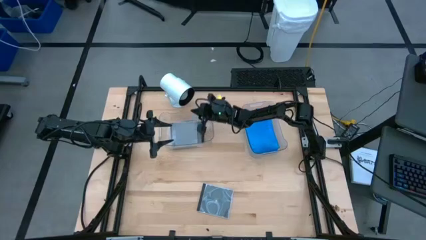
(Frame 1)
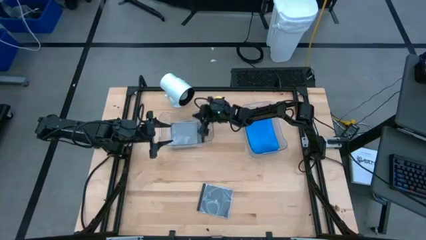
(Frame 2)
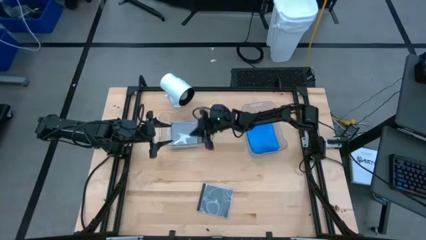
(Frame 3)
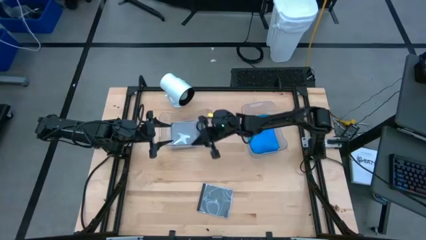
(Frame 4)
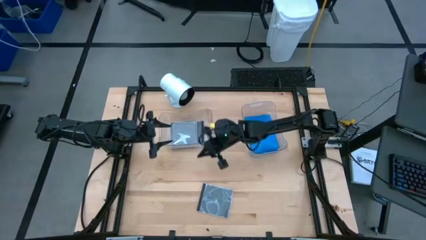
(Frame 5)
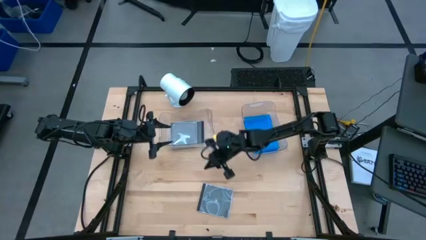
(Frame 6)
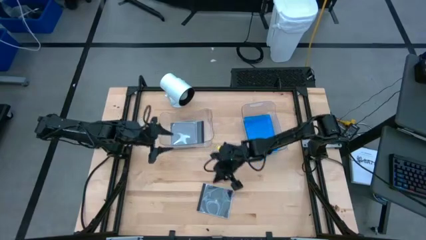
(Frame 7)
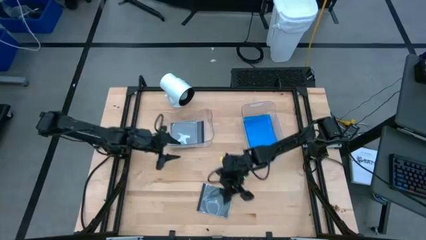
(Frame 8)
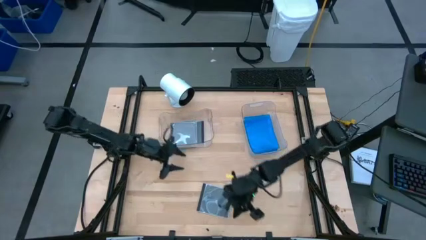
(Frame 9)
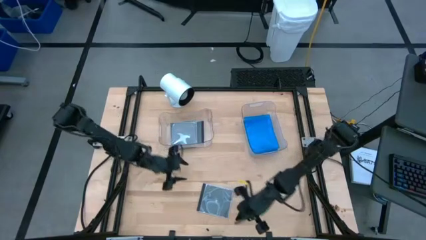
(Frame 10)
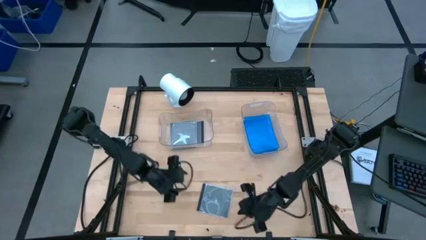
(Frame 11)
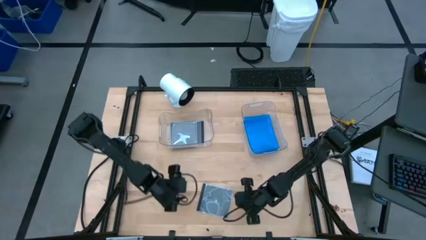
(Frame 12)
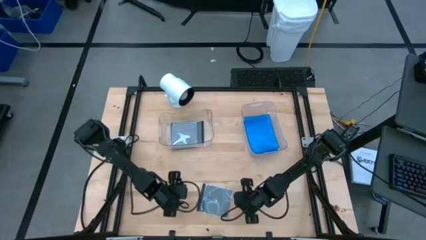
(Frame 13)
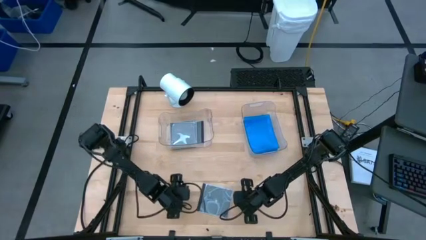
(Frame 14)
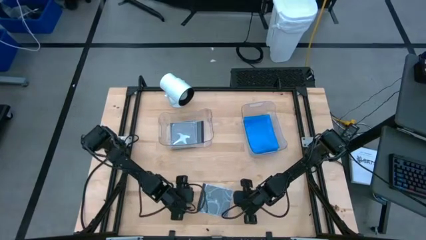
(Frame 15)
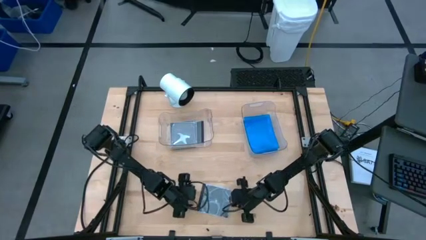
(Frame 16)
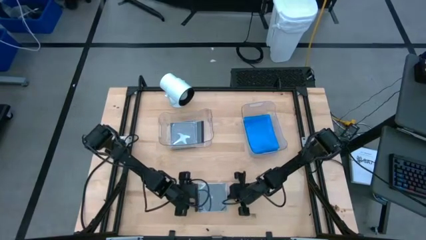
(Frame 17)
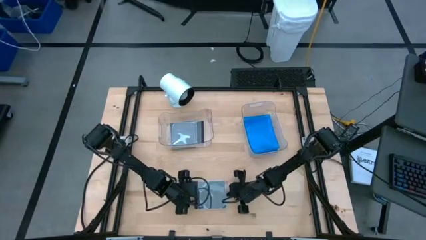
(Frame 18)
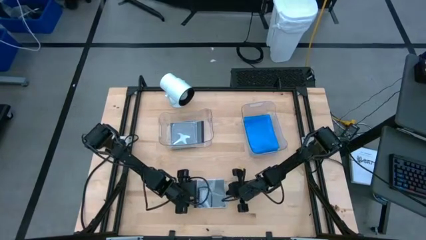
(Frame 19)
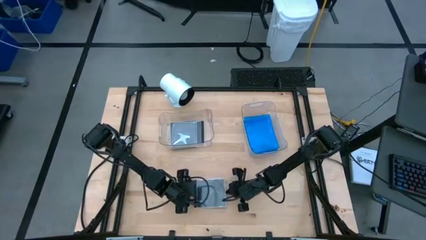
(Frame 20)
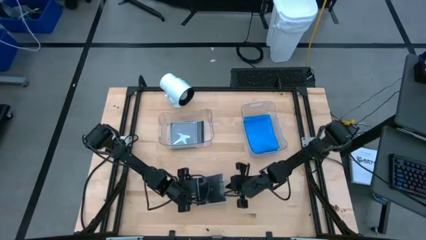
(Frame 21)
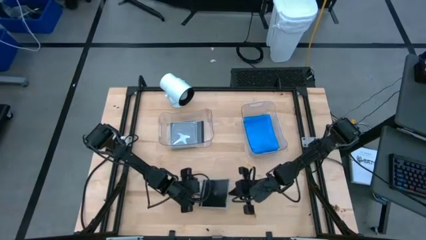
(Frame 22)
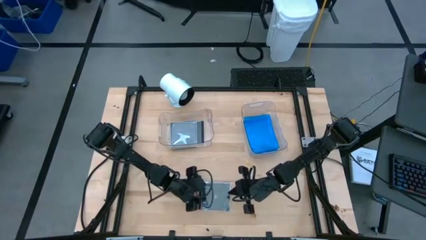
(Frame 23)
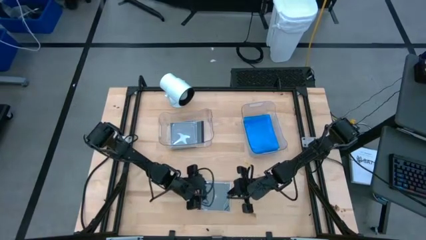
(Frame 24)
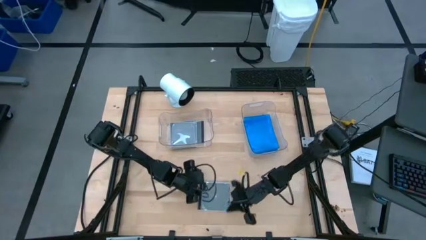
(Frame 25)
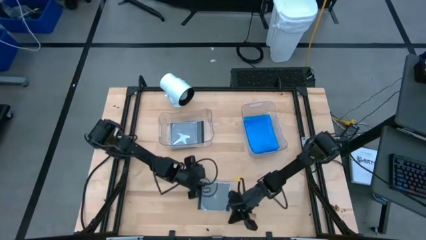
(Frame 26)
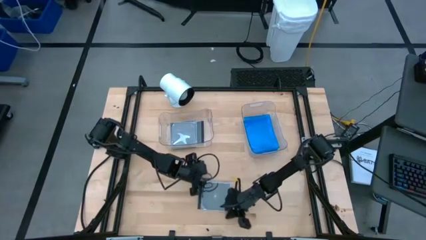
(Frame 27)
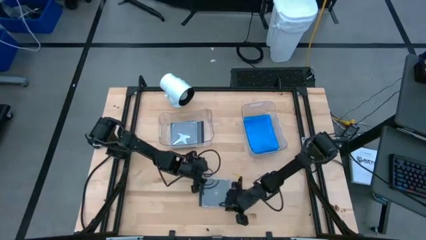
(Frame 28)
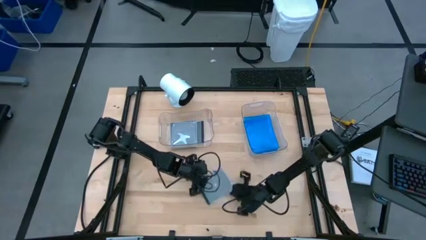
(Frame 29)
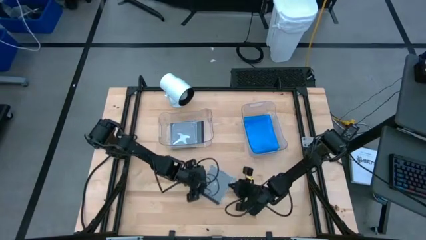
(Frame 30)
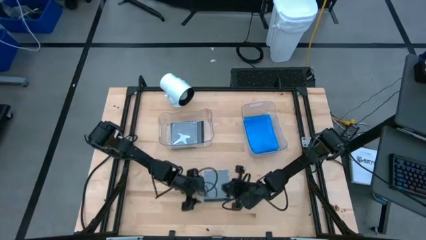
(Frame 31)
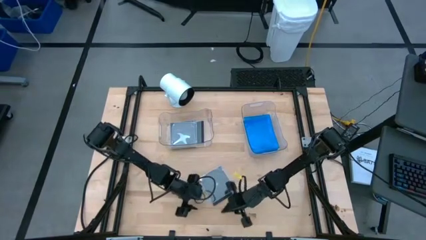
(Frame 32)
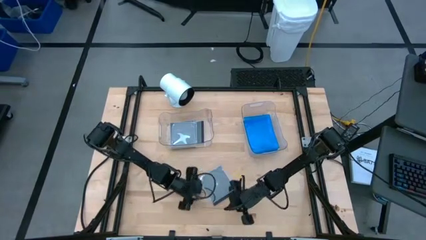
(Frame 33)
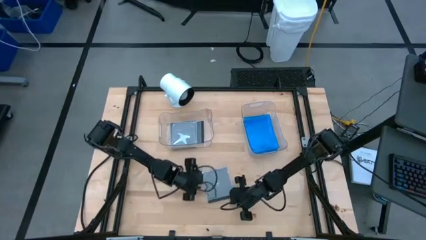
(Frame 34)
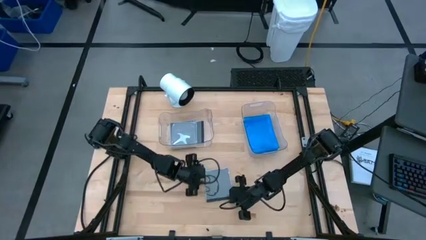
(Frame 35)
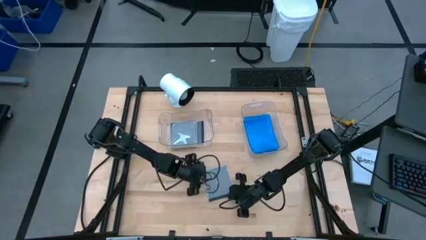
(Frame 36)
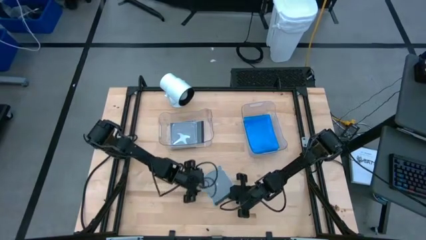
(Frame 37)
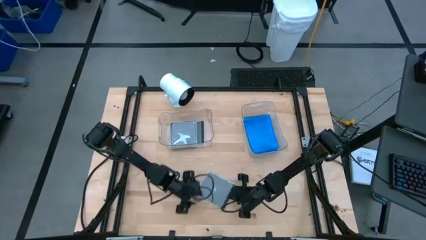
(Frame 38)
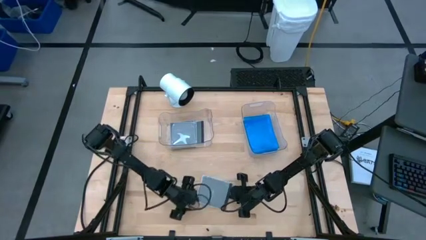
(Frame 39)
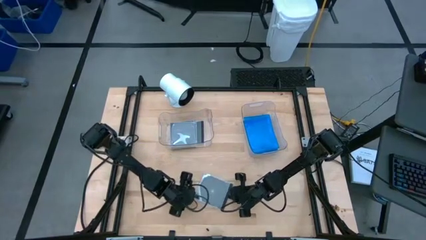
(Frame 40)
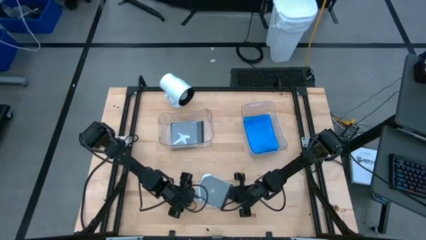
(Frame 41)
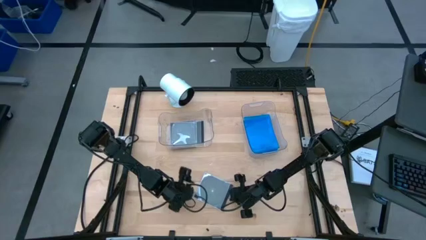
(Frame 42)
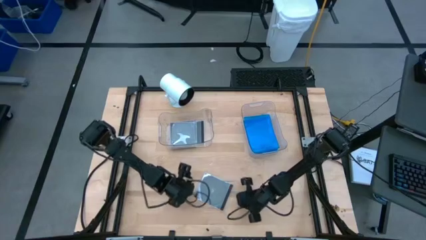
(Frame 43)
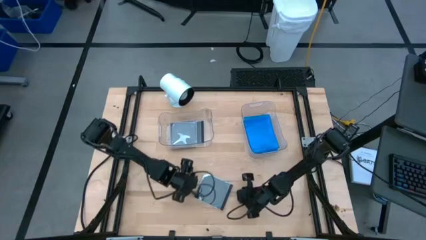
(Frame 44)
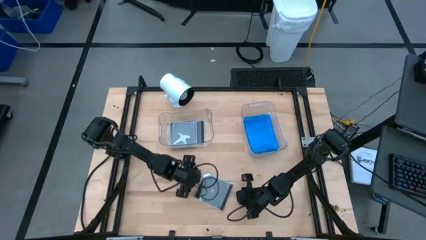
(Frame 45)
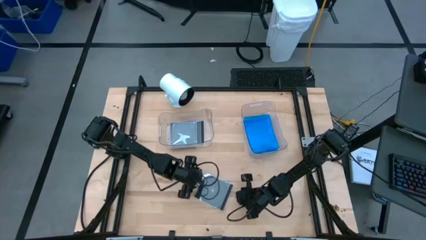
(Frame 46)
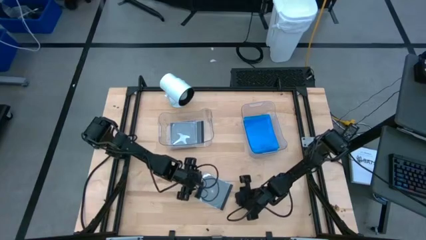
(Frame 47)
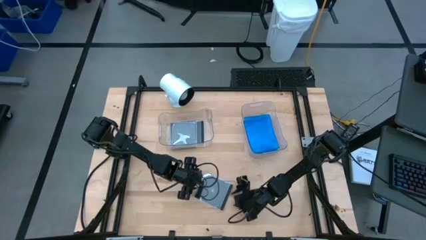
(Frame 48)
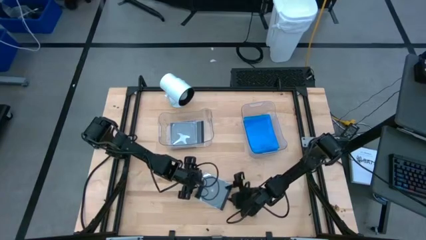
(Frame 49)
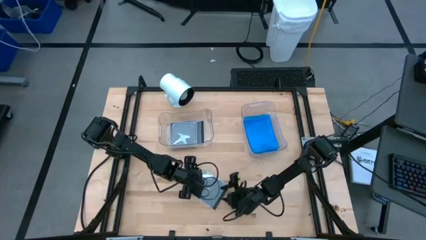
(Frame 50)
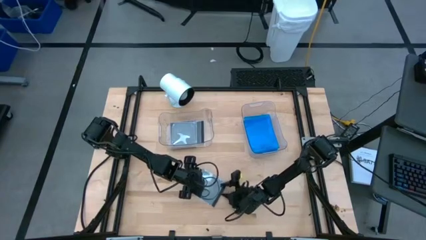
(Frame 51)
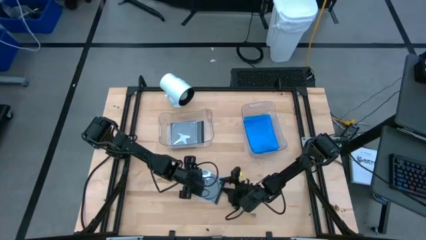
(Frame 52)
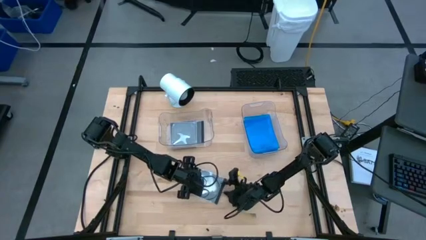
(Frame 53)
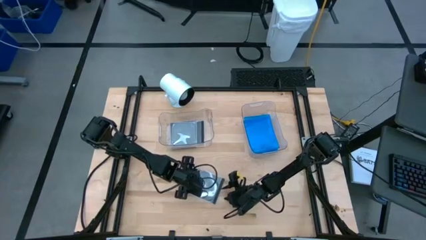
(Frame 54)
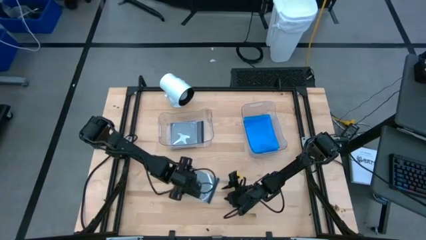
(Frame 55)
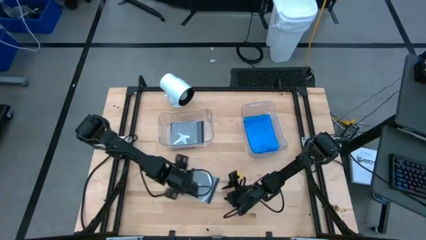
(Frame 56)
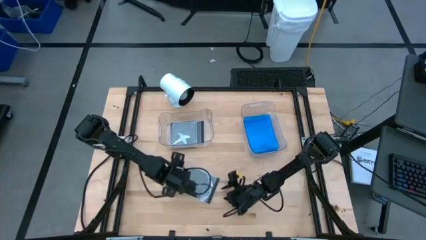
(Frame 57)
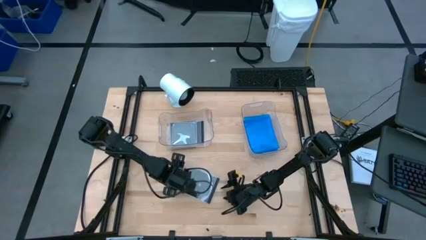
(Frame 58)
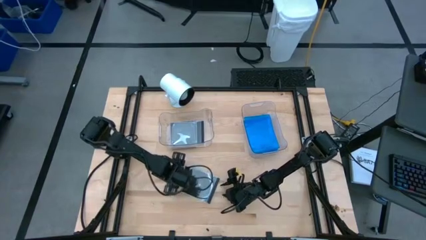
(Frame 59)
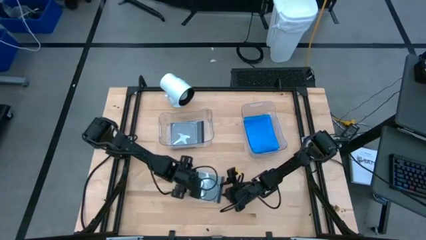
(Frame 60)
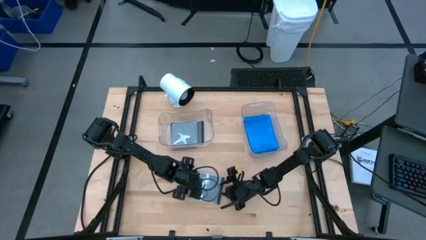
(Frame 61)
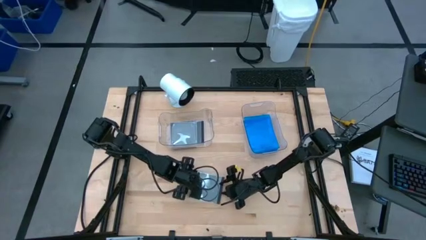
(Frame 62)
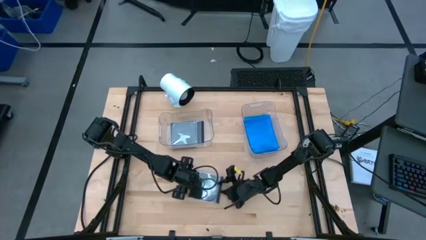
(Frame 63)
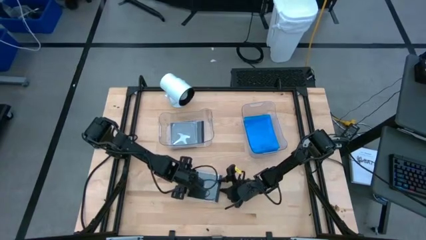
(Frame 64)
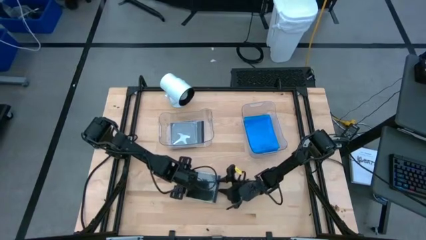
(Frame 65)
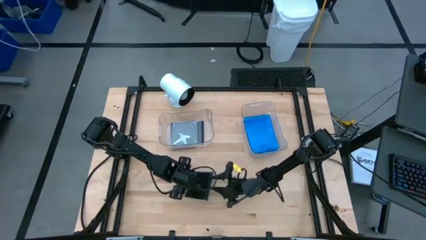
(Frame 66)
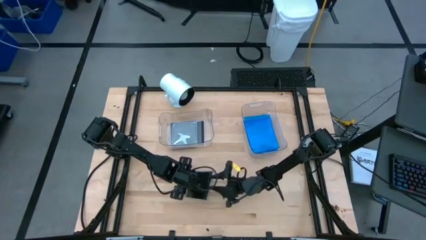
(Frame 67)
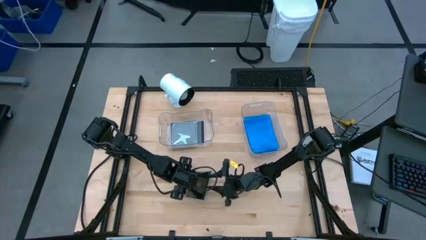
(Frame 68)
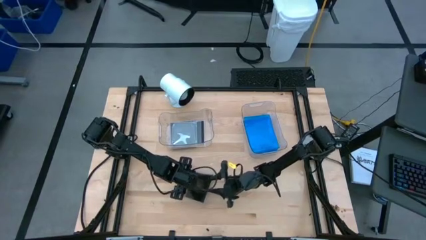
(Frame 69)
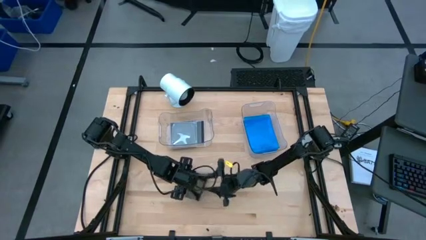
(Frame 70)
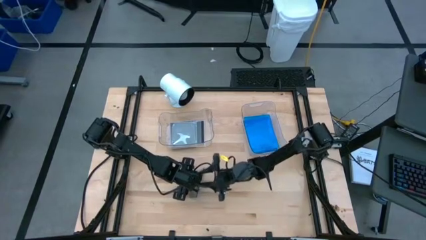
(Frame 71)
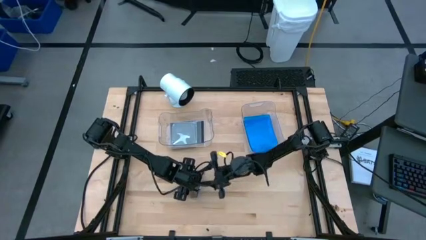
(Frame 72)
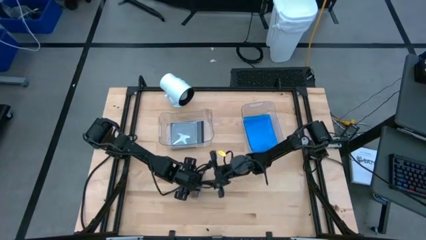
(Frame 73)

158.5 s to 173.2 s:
Task: Pick & place jewel cases by type
Put the black cd case into the left transparent bin
